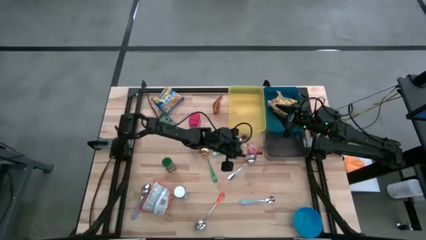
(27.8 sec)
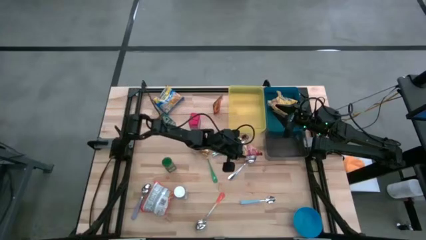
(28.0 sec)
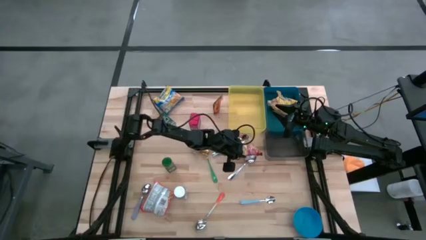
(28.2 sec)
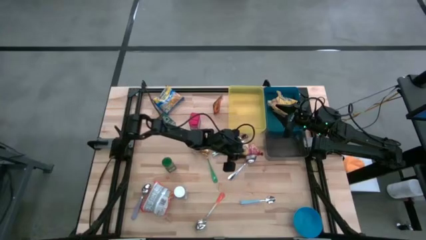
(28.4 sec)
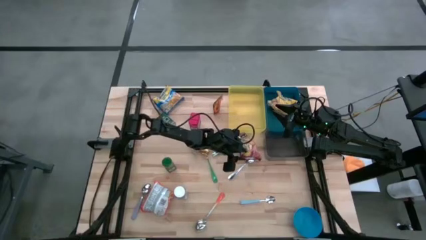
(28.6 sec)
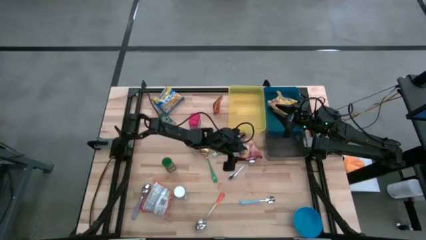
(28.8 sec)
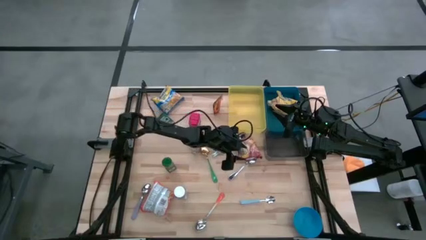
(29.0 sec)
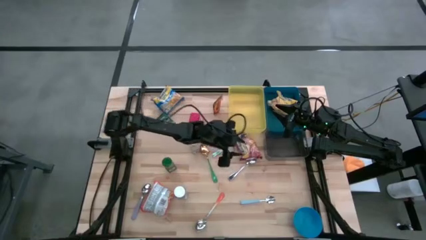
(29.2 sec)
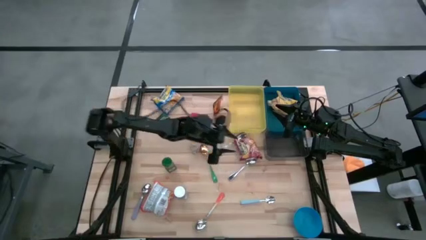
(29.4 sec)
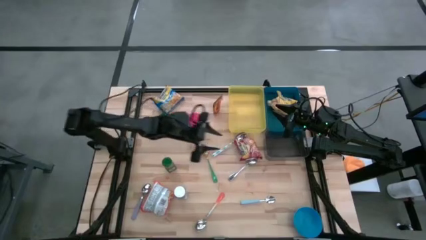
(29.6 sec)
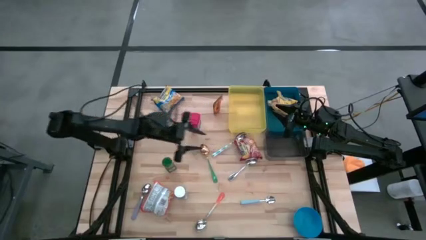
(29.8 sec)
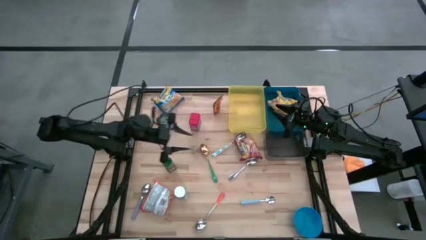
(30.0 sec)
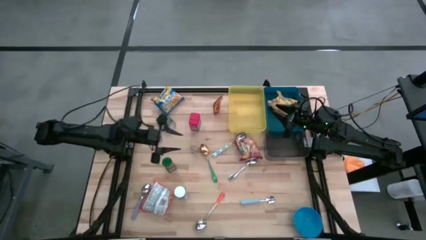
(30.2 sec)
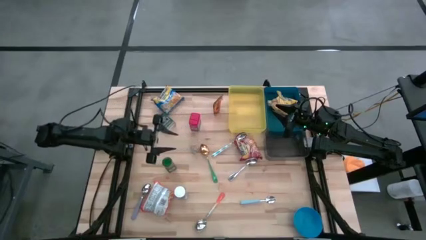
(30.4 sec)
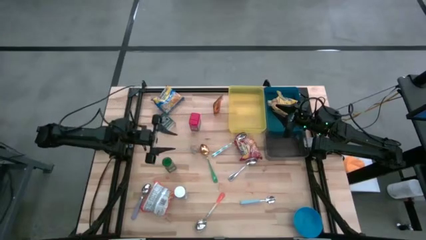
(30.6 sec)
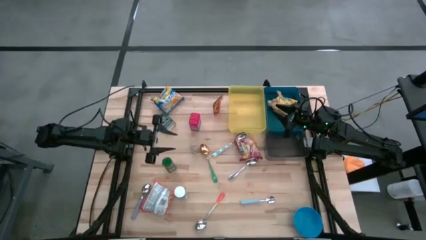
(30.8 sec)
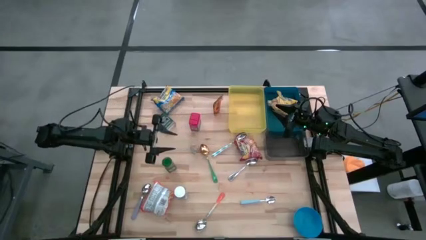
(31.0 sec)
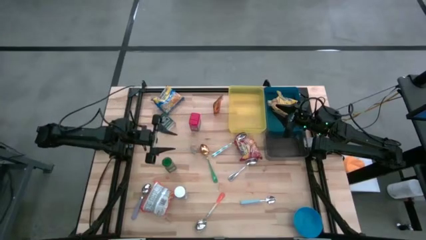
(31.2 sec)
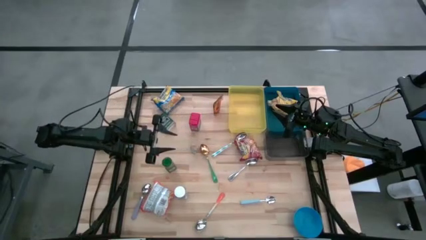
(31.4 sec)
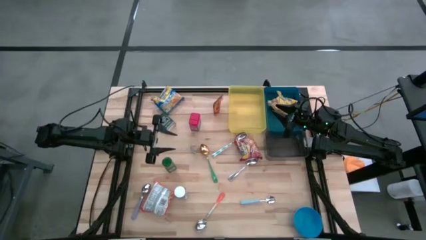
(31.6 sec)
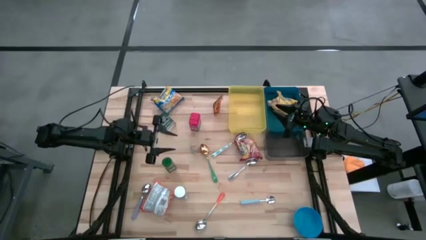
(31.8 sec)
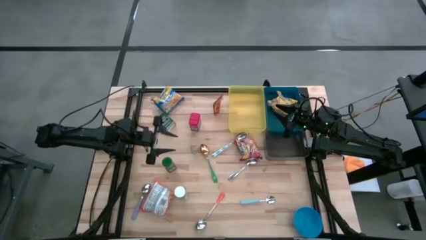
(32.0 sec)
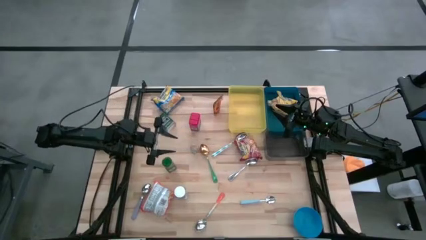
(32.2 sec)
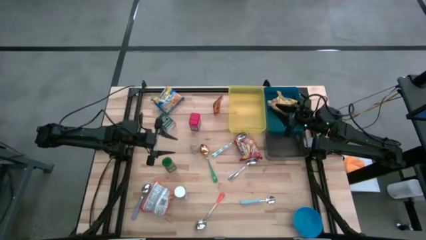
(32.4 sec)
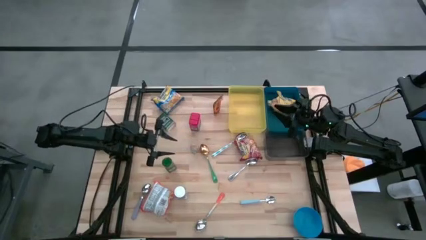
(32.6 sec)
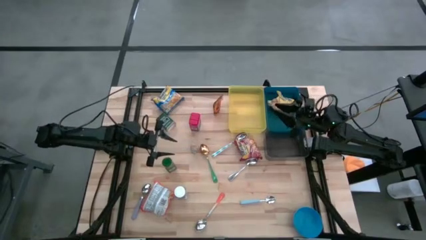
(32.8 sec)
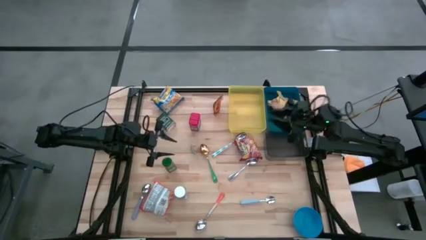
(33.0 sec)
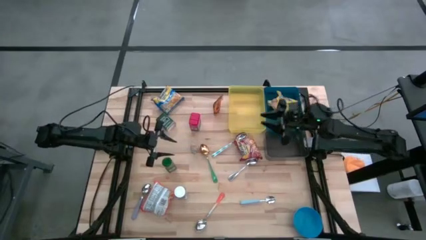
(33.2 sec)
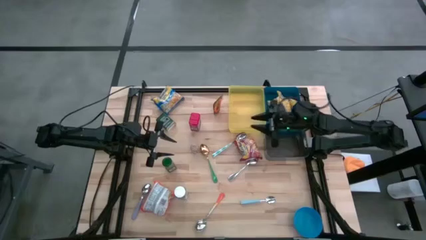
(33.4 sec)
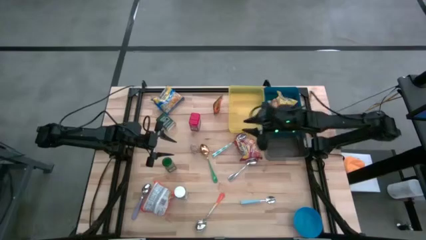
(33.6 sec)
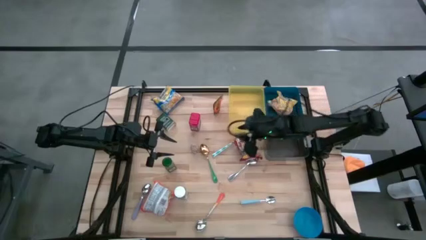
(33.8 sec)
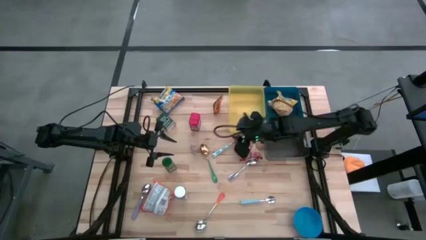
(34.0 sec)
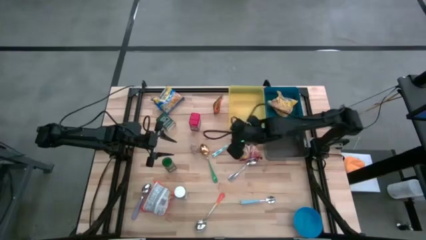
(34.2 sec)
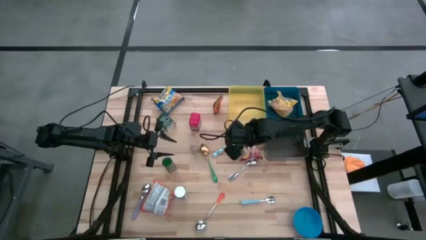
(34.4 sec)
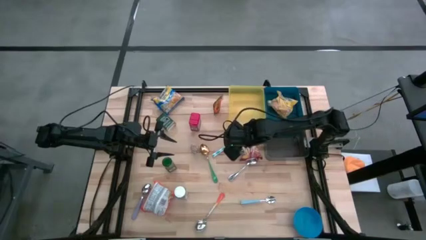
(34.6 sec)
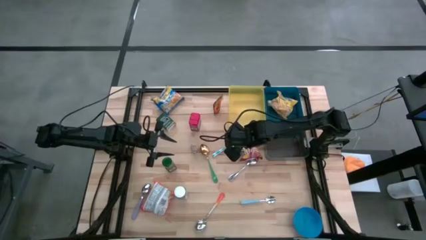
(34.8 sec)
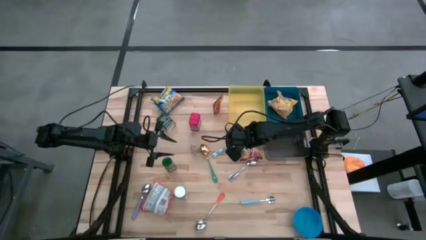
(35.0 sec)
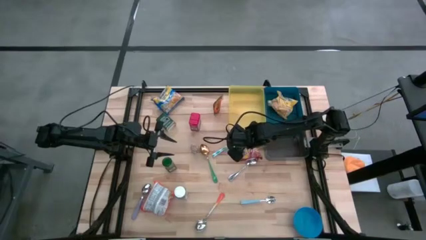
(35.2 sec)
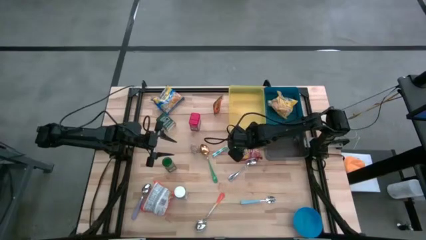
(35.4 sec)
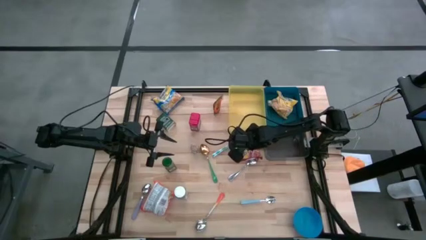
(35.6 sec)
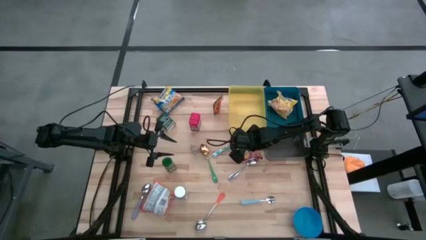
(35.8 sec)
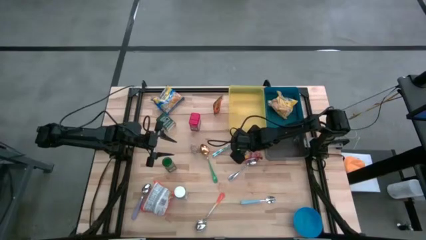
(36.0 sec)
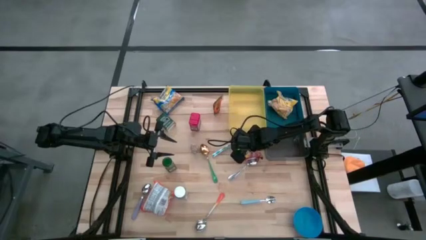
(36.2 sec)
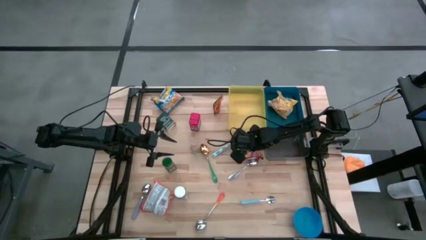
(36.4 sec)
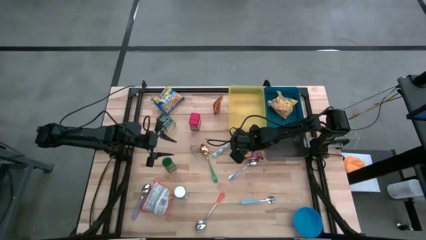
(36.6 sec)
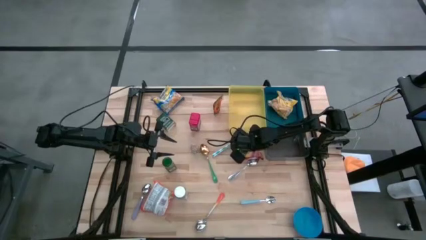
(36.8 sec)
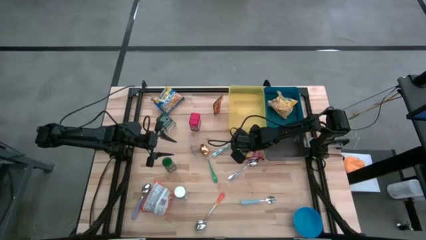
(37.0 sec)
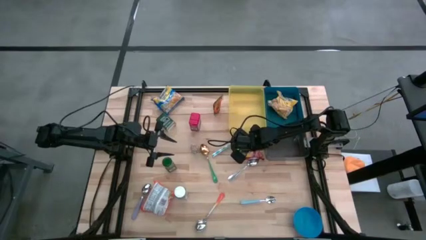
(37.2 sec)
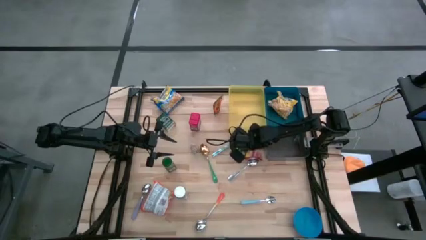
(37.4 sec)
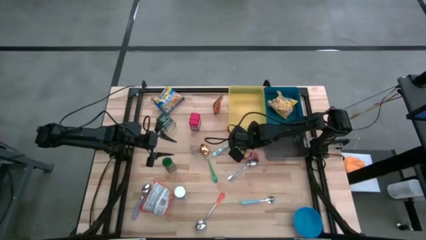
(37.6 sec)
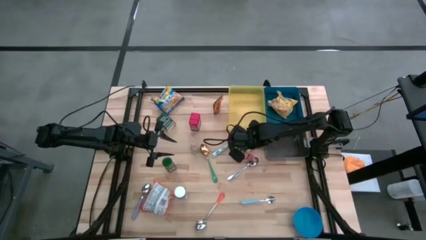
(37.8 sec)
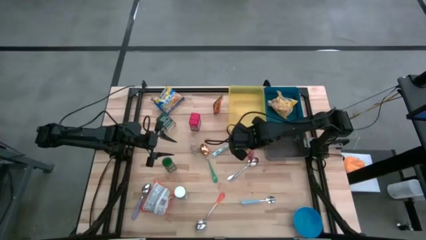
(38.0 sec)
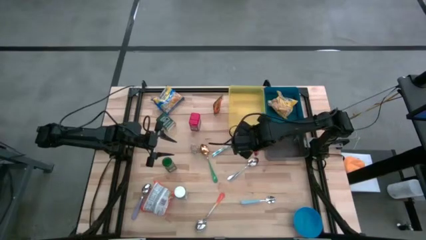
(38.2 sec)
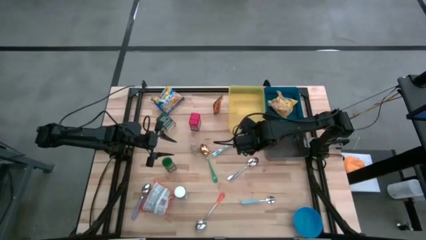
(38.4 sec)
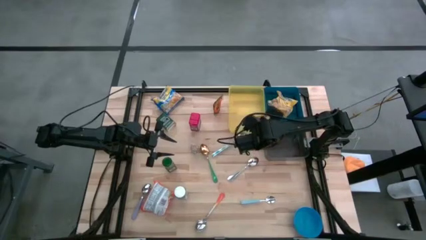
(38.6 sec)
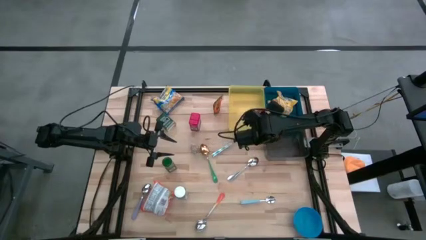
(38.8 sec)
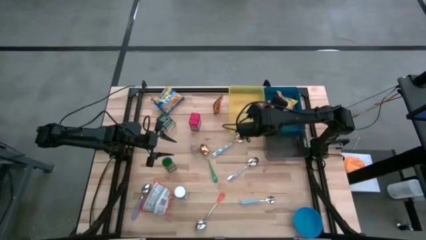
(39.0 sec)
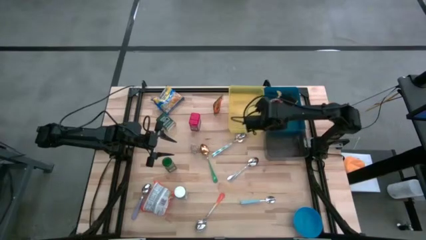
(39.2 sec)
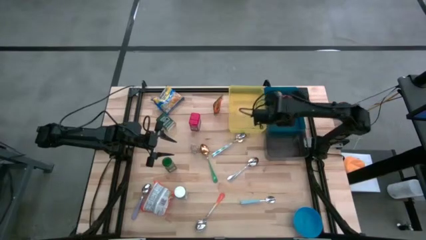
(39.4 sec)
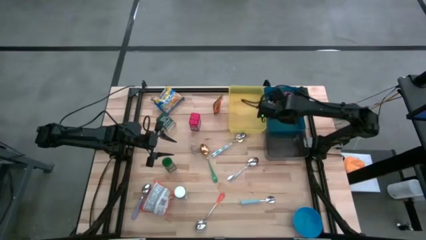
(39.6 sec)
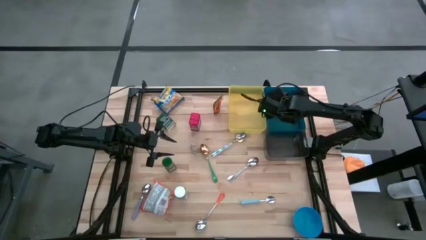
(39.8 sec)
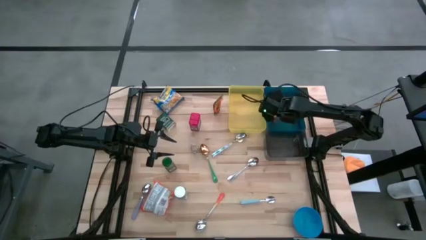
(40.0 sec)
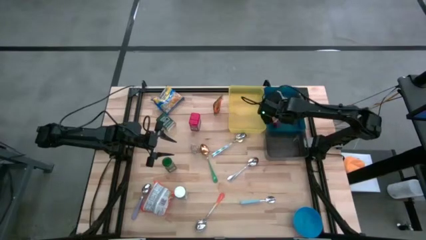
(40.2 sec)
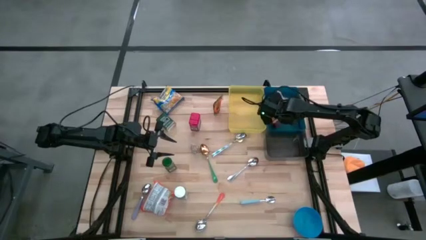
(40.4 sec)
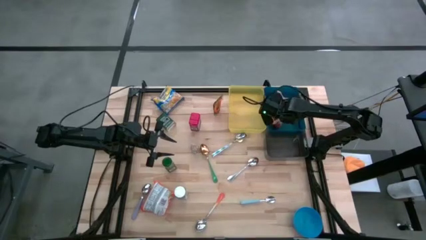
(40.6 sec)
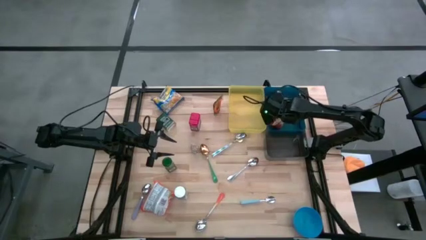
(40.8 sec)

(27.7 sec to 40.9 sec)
Put the red noodle pack into the blue bin
